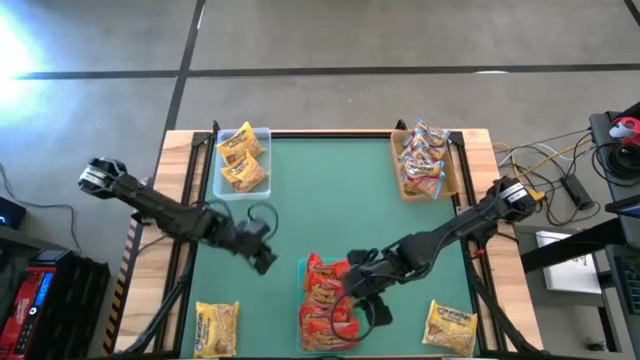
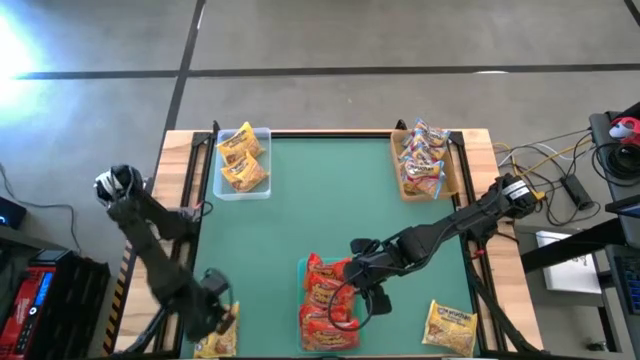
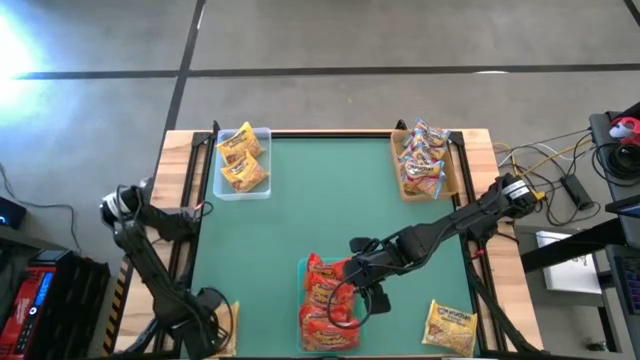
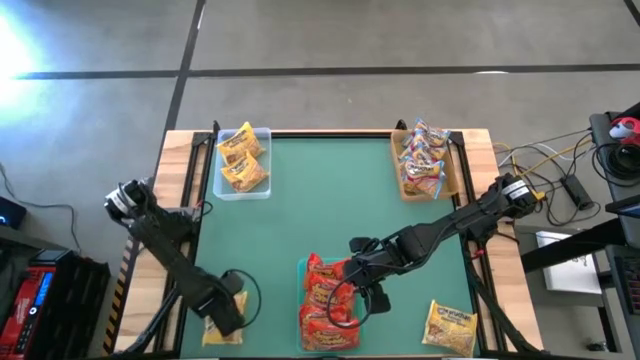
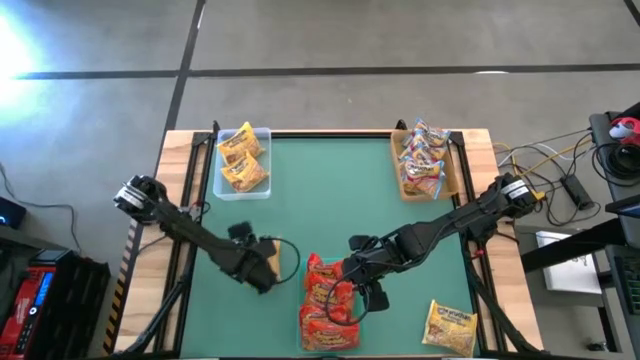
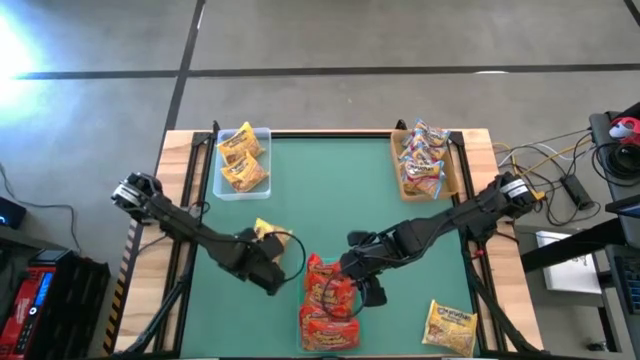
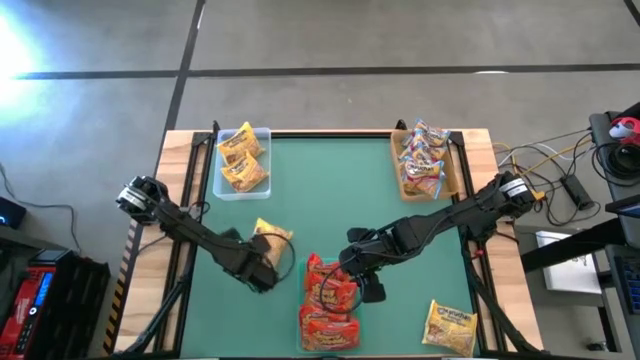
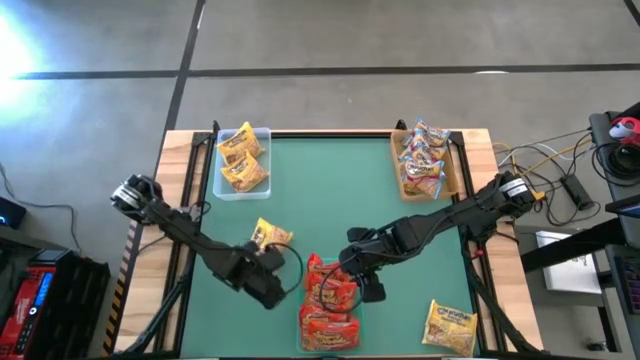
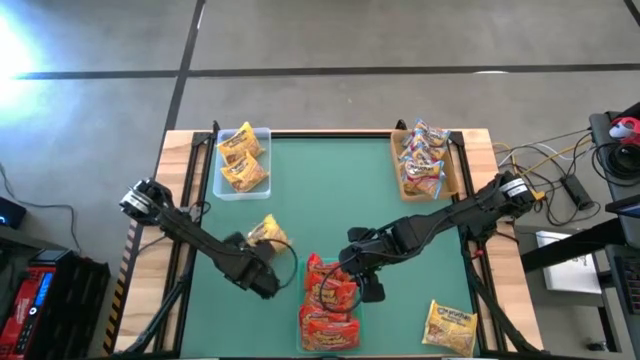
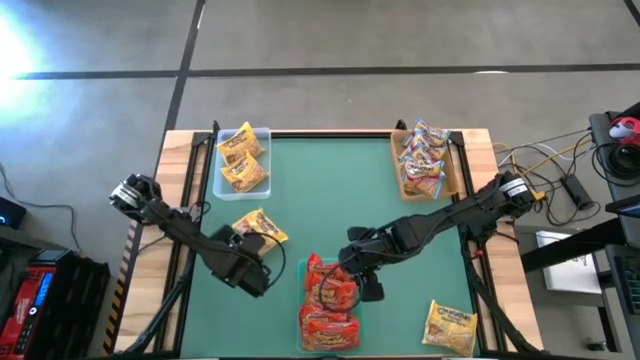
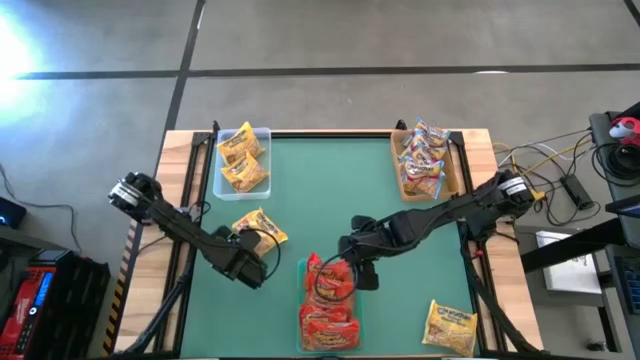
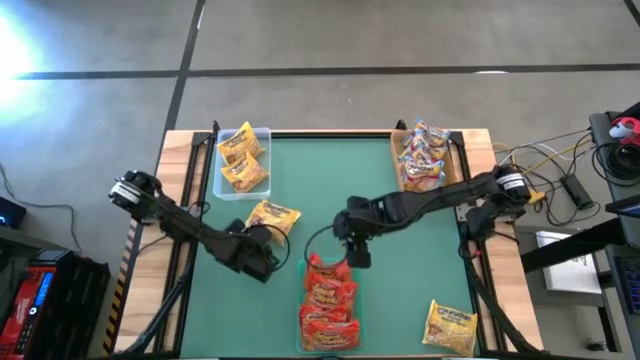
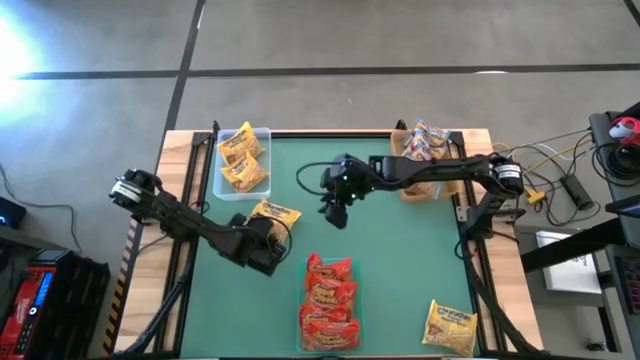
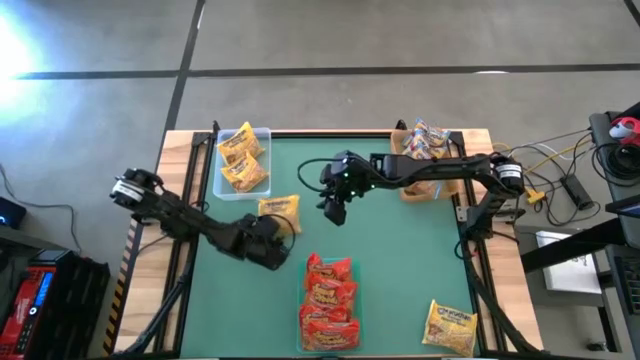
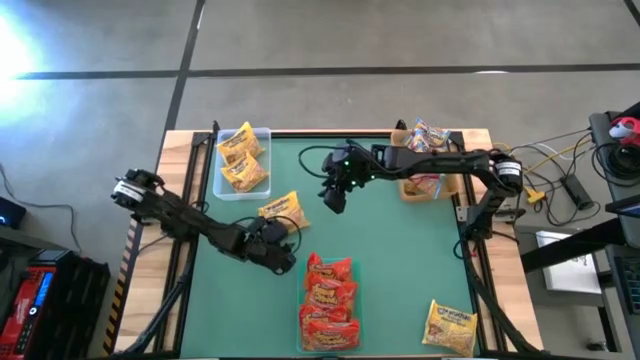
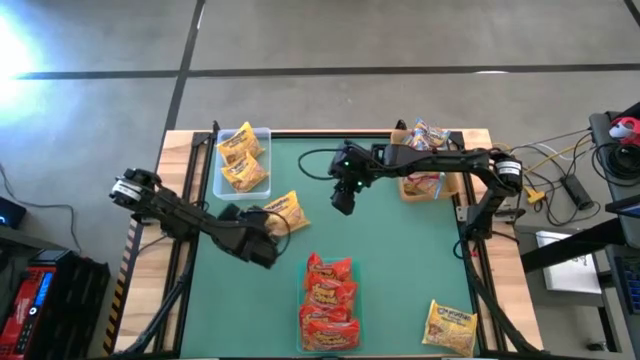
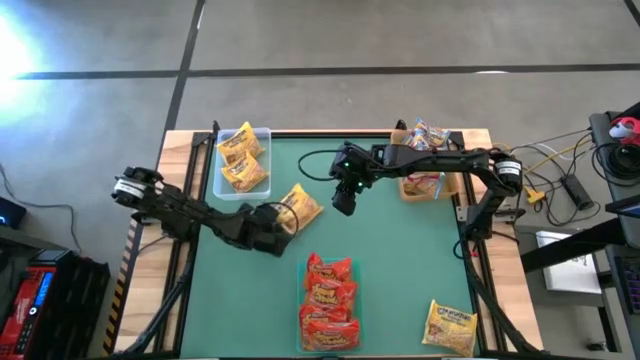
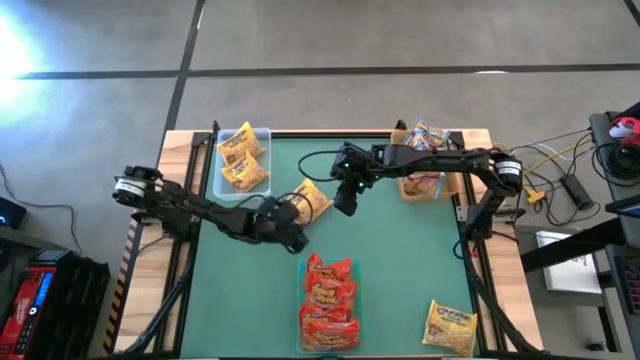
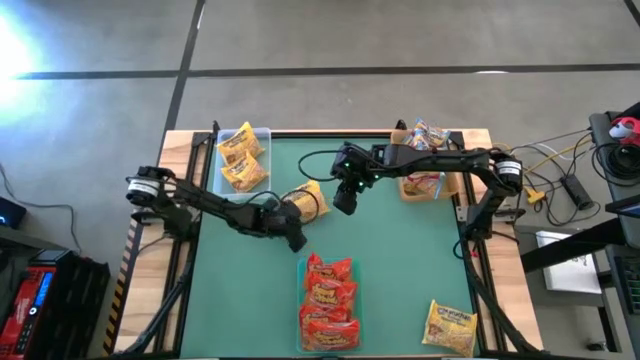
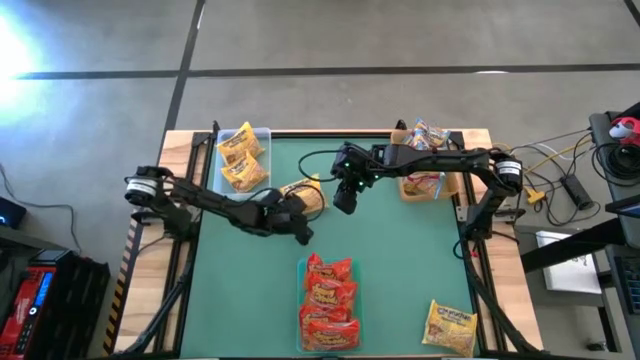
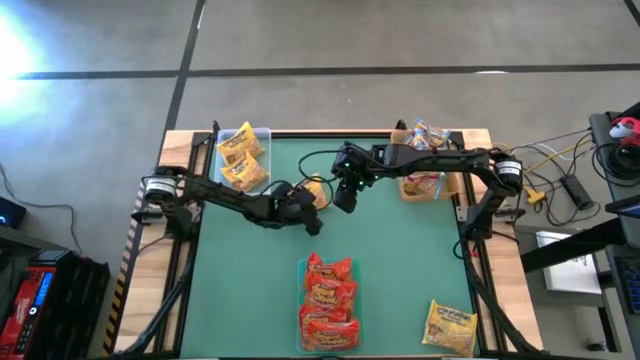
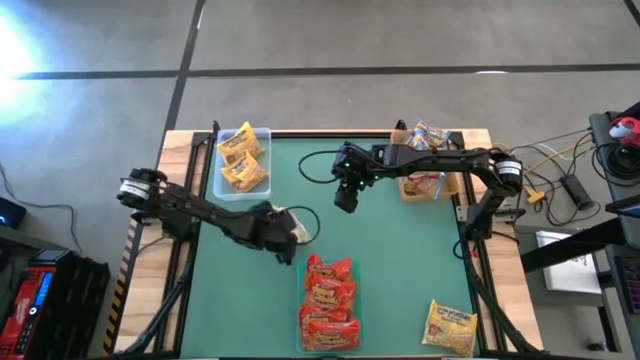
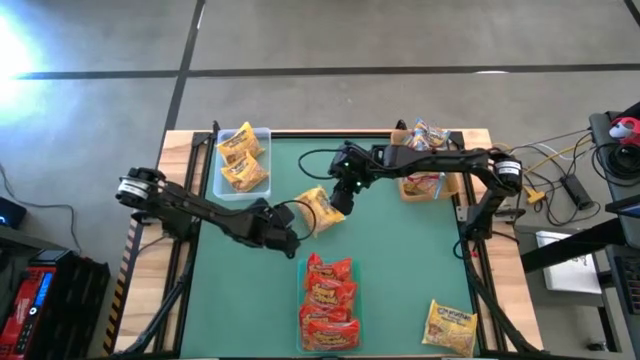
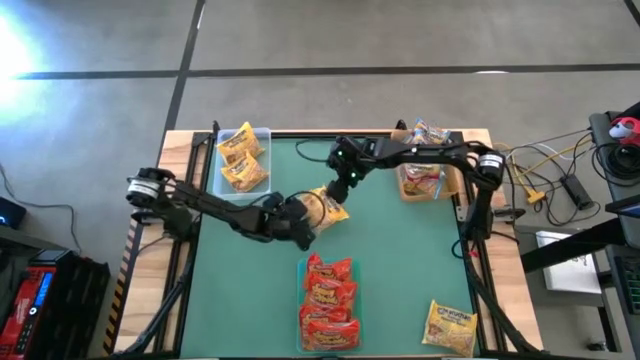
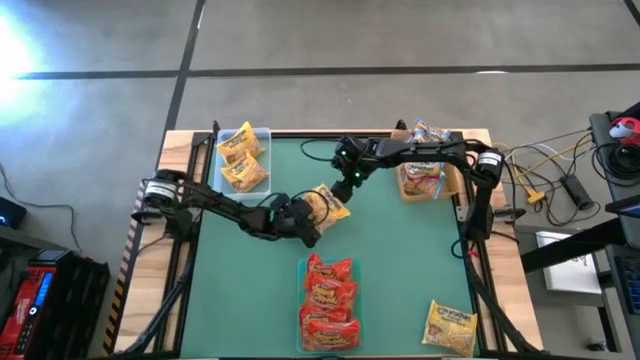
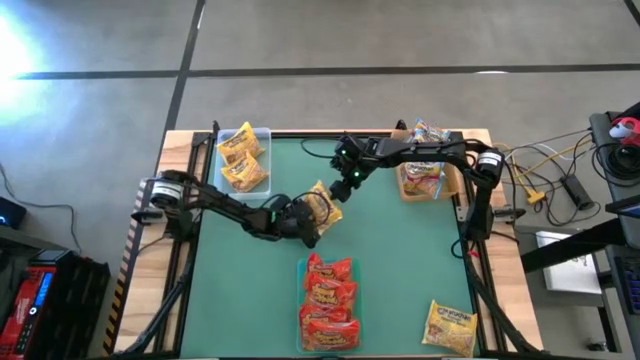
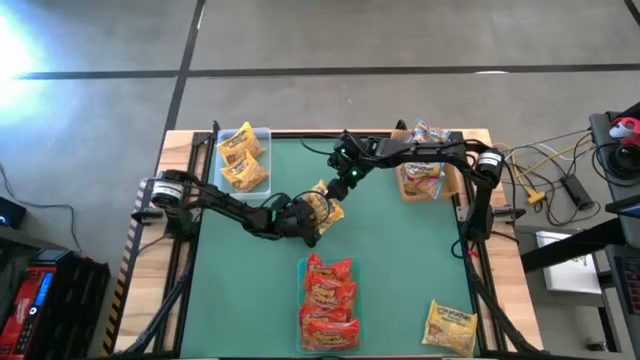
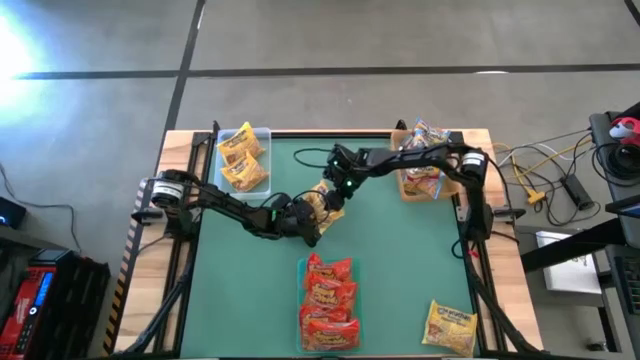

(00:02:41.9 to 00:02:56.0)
Task: Sort Maruchan noodles
Put the yellow noodle pack into the transparent bin

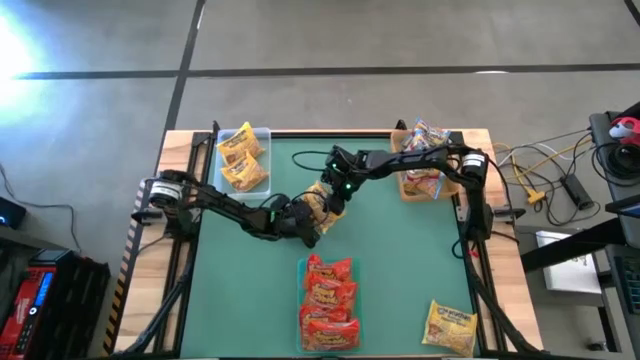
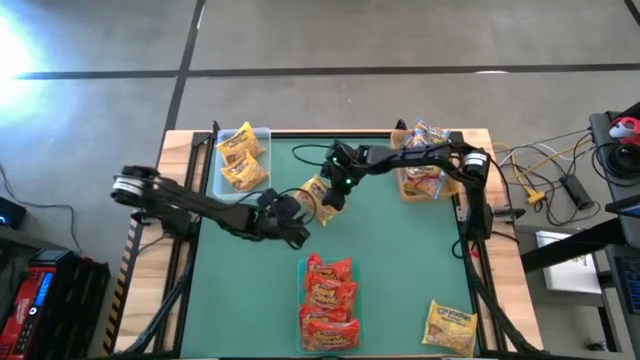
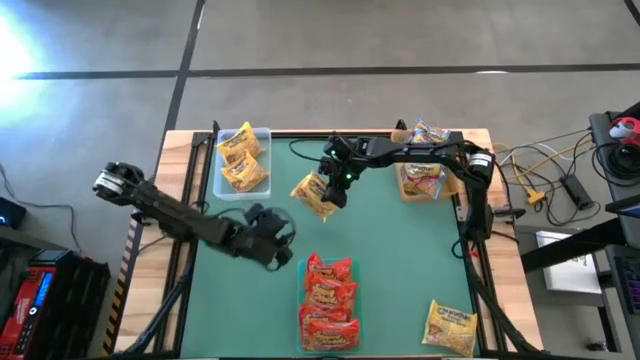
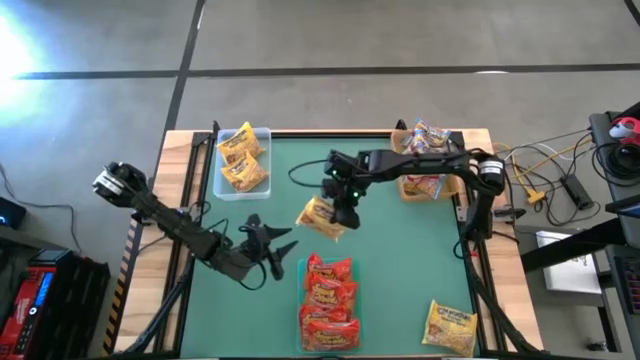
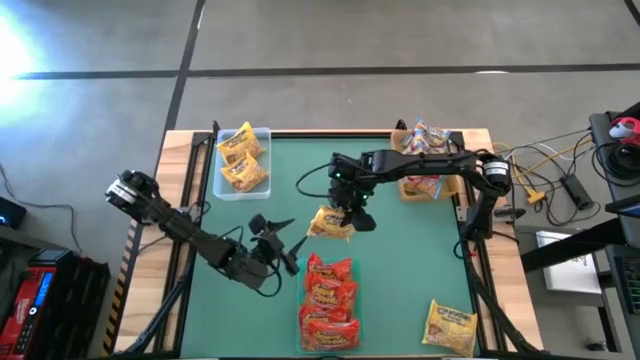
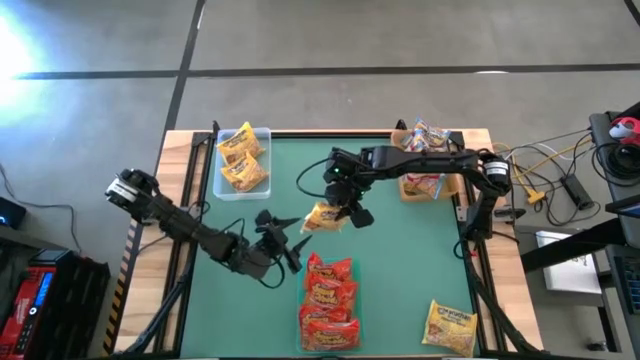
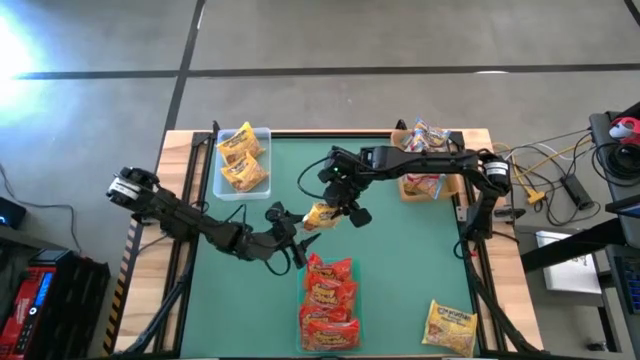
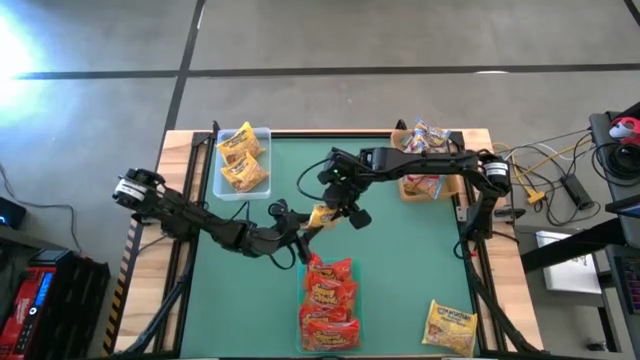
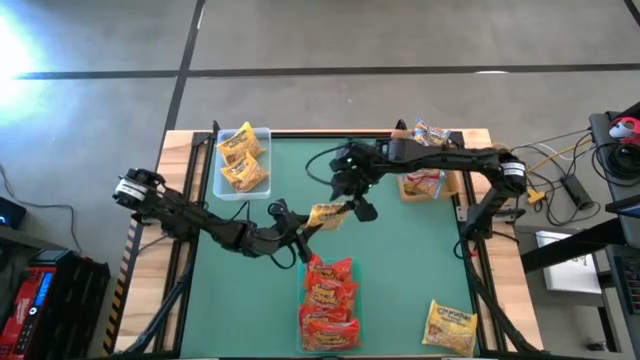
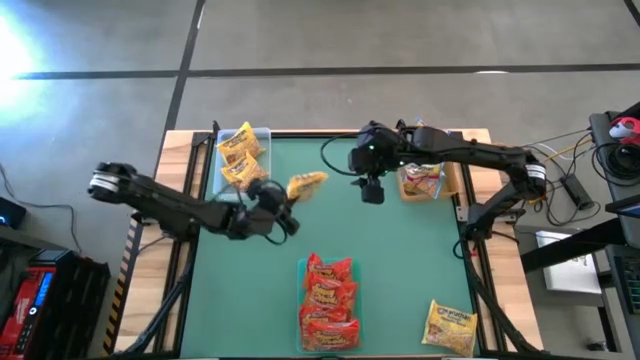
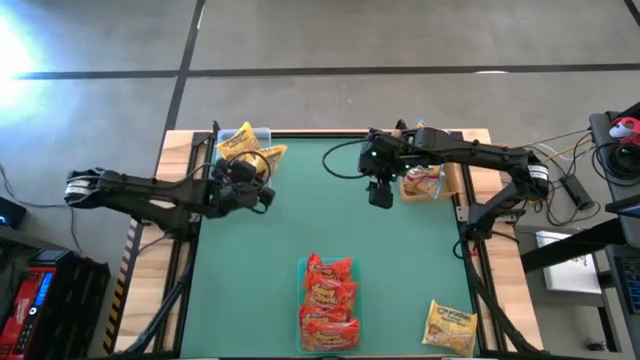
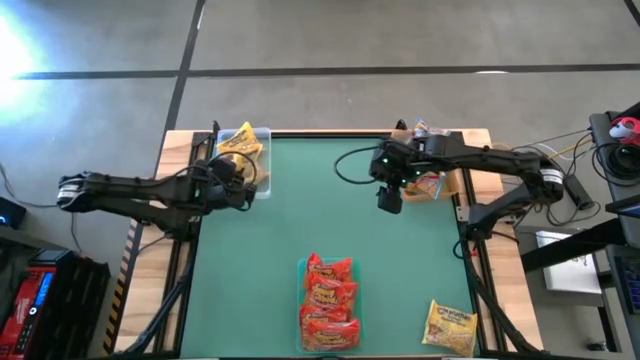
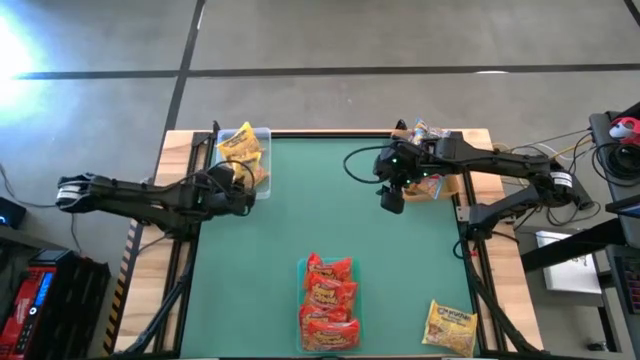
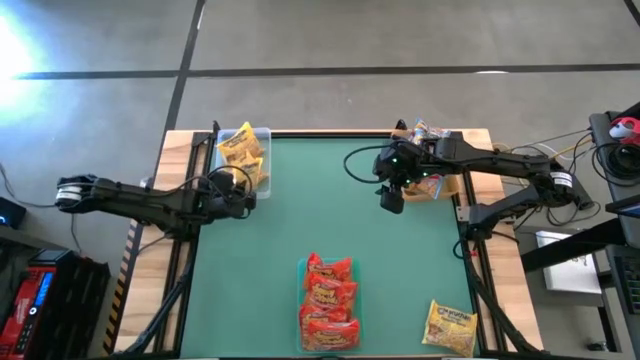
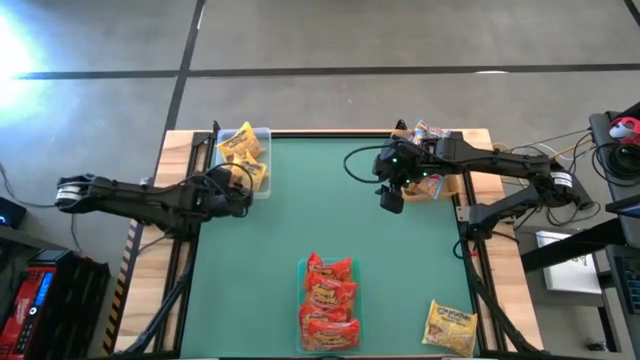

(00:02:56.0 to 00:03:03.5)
Put the yellow noodle pack into the transparent bin
